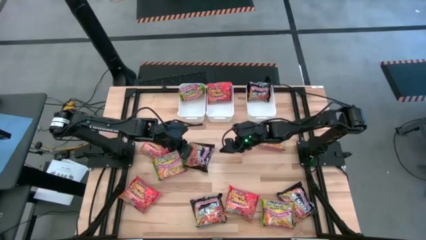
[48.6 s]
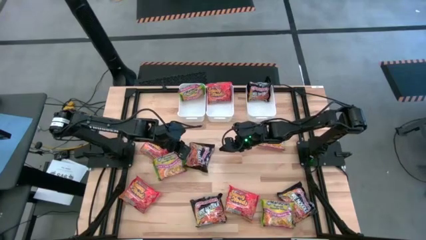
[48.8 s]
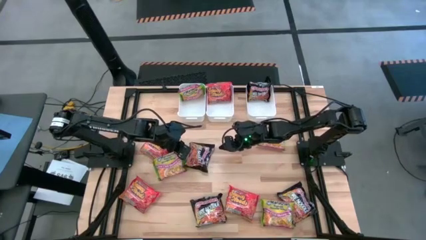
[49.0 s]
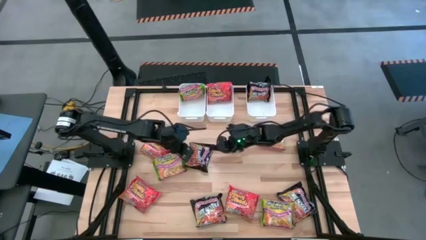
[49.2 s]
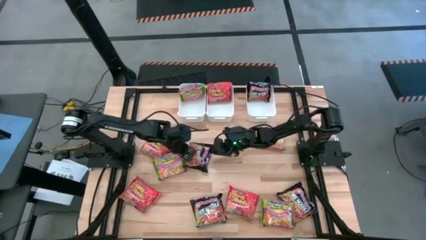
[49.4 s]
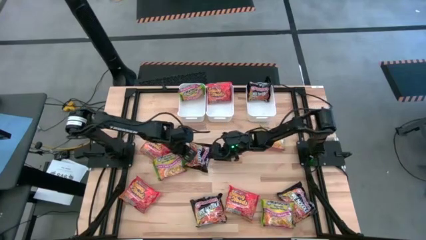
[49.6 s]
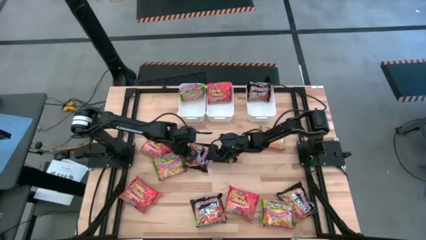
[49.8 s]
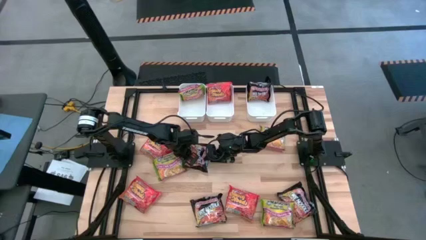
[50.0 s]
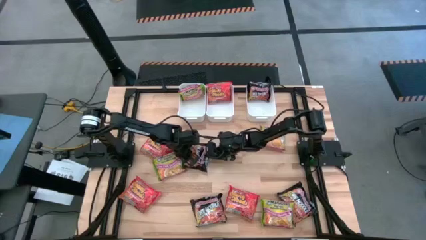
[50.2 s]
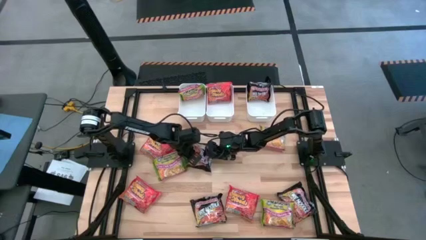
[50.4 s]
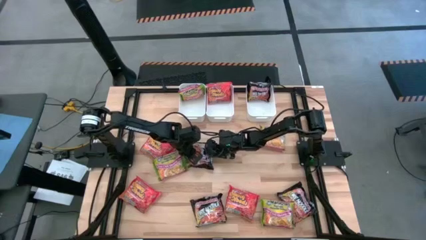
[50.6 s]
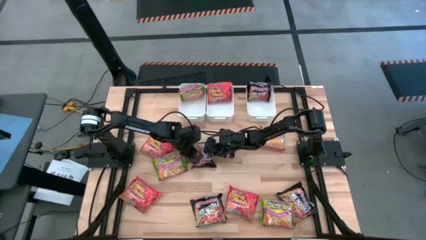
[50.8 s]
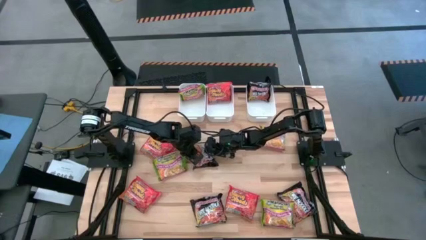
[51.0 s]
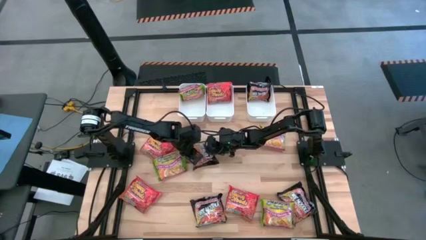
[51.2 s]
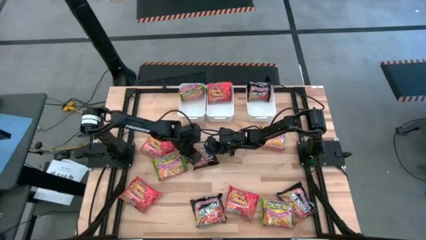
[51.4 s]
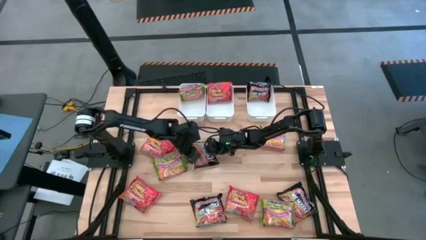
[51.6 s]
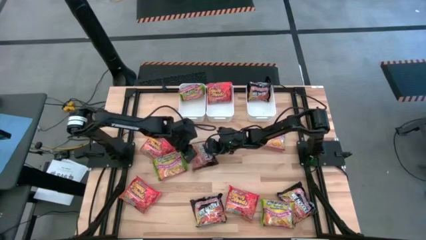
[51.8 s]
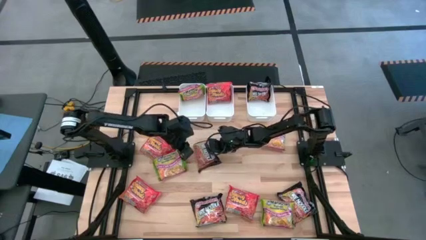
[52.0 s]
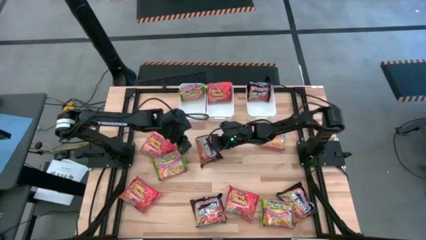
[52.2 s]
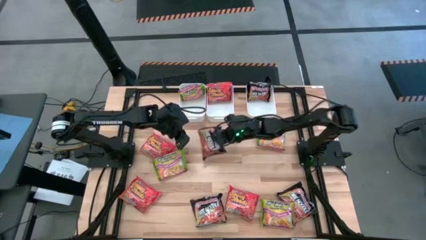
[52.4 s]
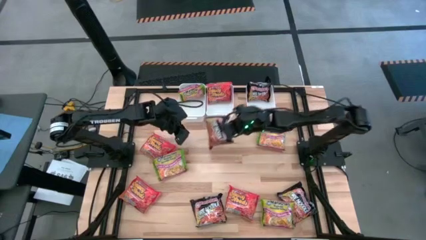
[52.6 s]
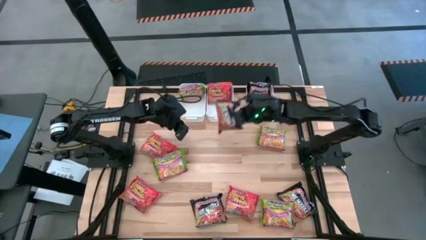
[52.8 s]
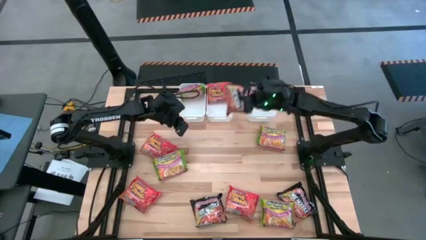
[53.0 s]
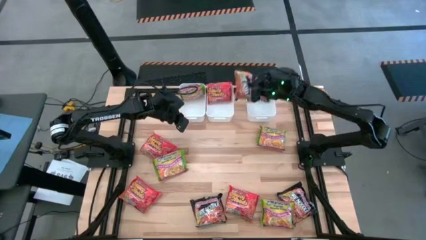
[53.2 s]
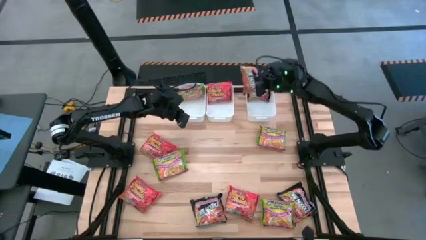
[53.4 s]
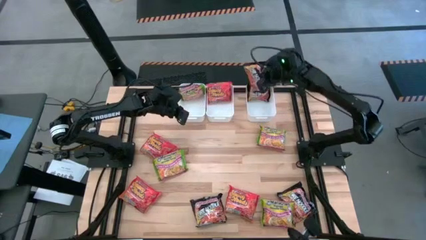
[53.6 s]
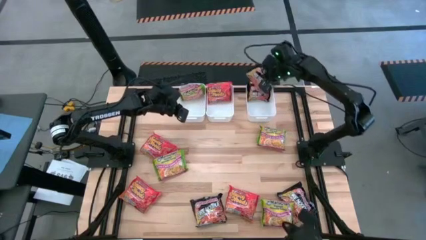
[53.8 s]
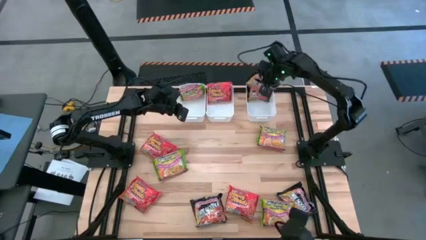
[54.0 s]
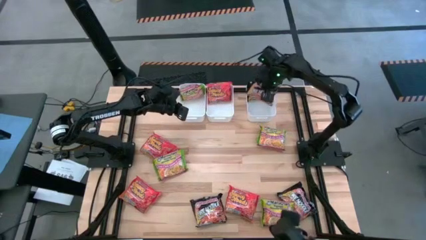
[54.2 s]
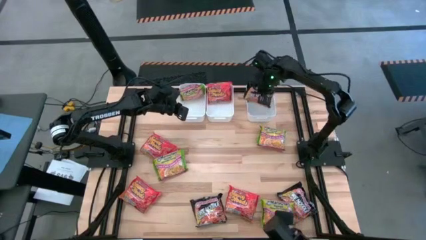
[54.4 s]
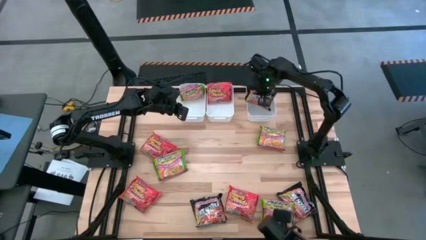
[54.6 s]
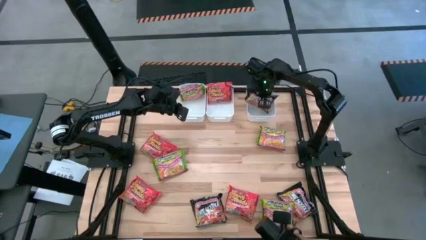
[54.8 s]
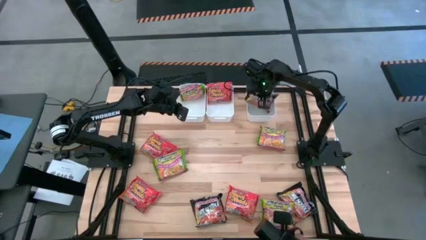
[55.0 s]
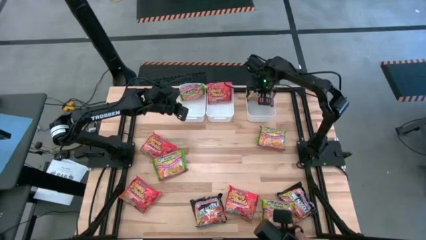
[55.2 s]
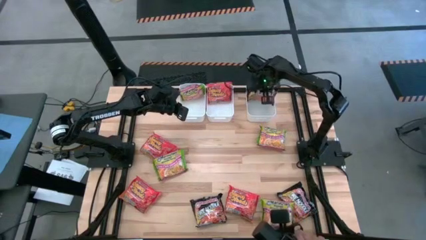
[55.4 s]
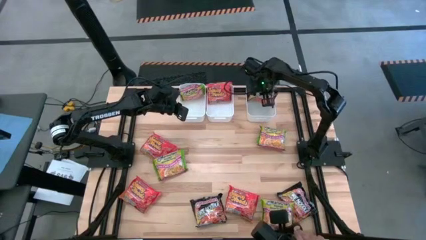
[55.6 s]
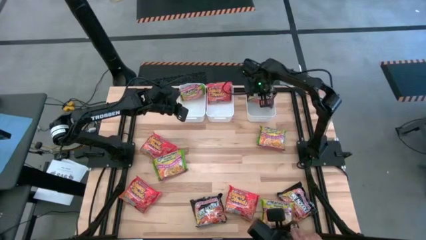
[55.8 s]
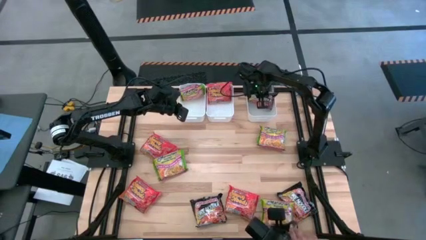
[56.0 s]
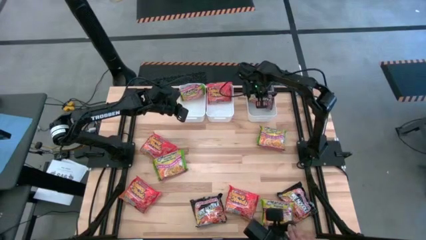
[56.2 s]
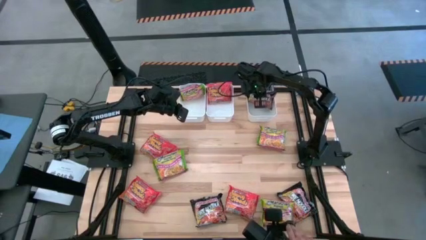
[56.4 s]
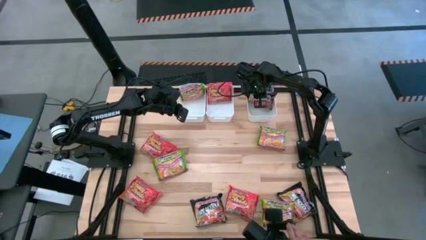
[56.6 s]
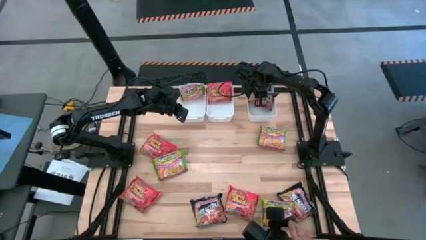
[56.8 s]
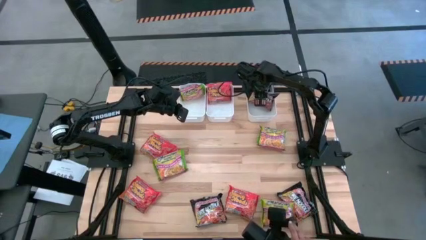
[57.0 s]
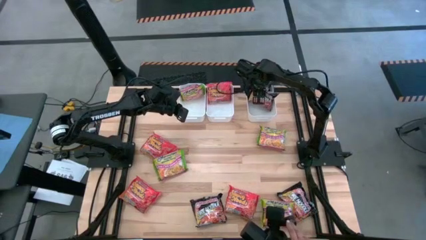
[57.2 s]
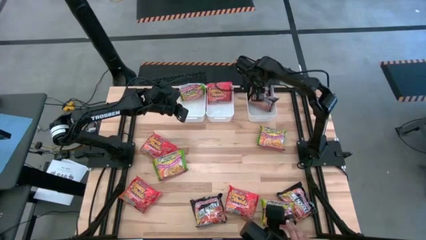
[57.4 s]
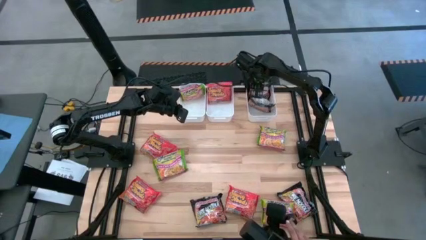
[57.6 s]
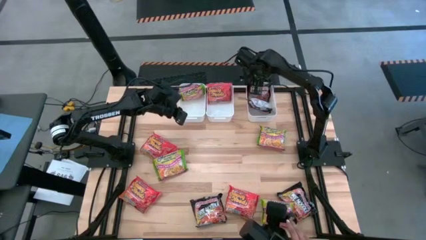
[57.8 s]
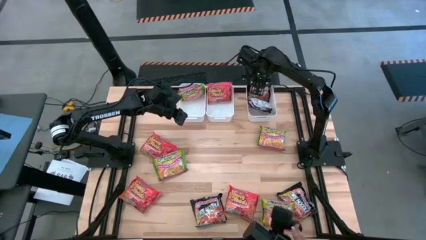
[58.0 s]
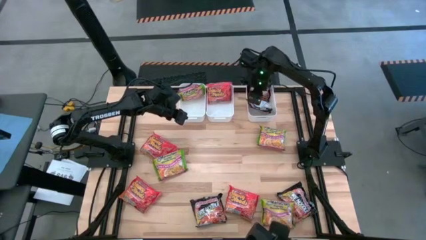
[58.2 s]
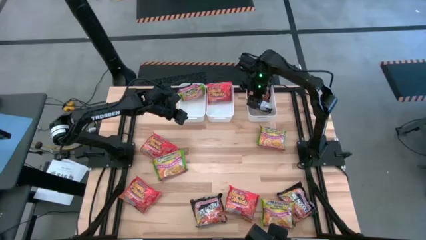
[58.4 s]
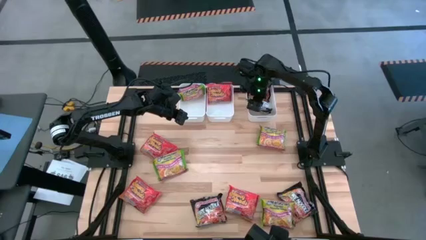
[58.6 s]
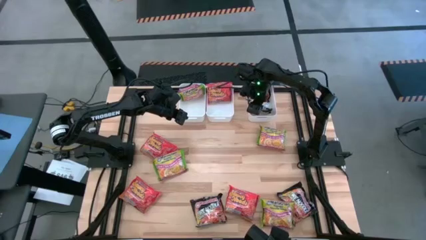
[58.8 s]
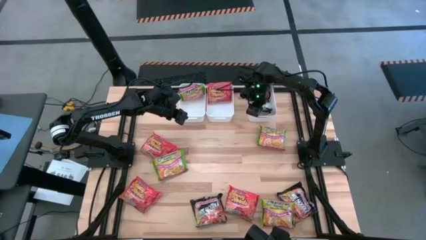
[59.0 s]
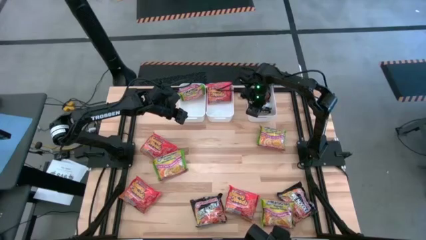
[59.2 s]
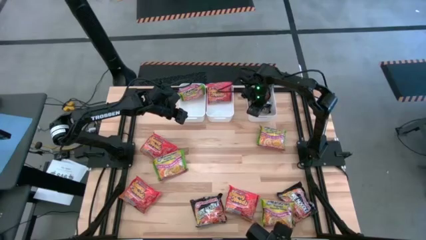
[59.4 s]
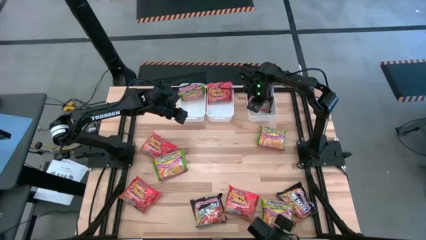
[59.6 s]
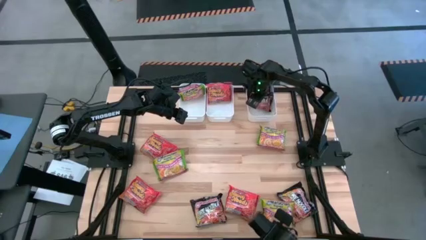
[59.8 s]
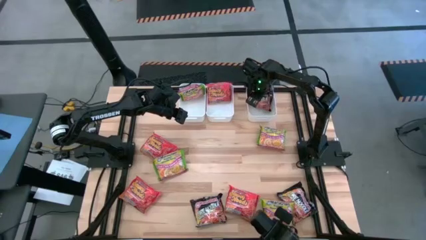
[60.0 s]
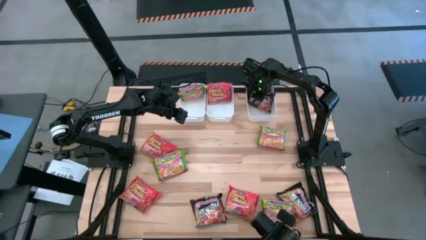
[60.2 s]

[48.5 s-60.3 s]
Task: Sort Maruchan noodles
Put the black noodle pack into the right white bin

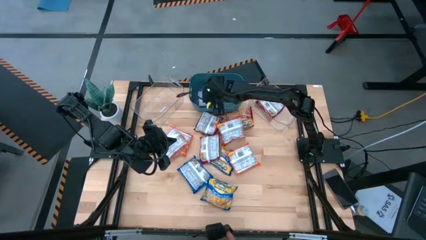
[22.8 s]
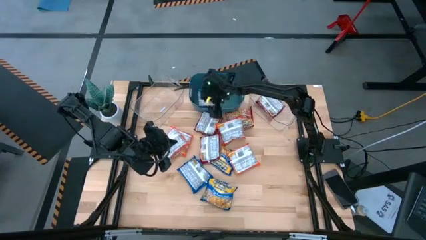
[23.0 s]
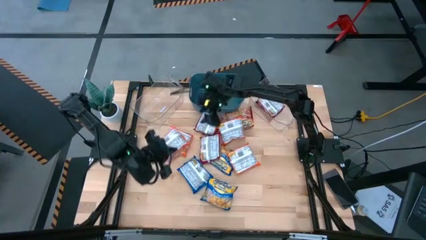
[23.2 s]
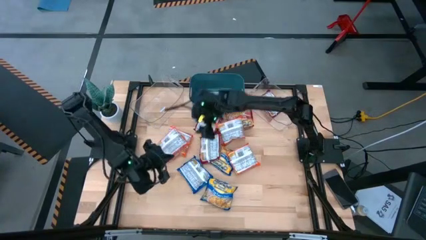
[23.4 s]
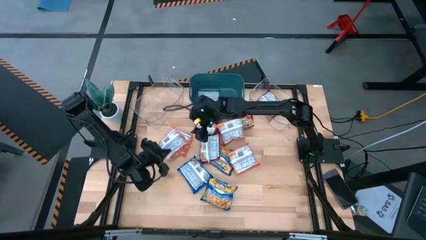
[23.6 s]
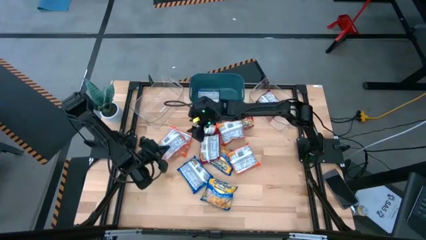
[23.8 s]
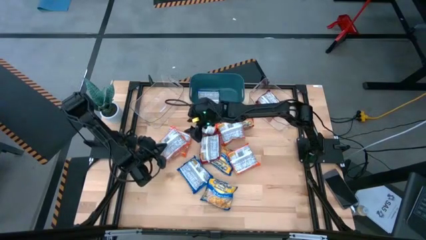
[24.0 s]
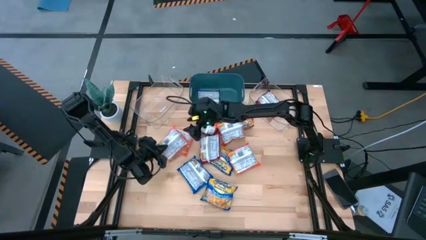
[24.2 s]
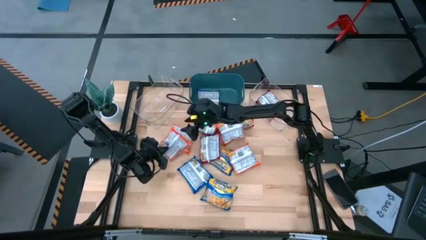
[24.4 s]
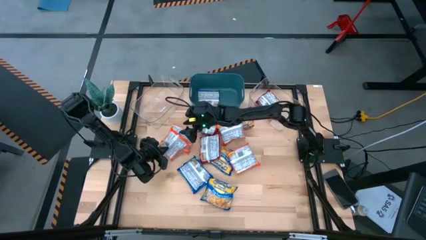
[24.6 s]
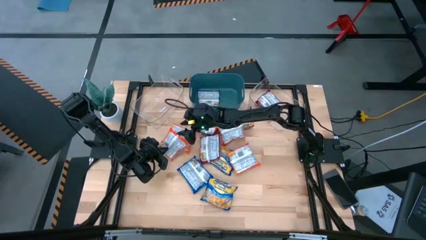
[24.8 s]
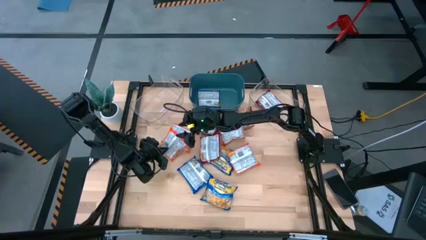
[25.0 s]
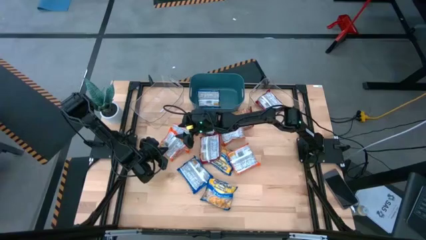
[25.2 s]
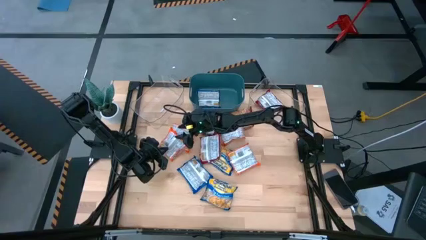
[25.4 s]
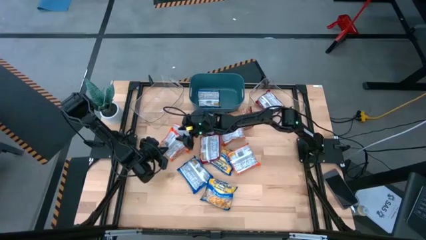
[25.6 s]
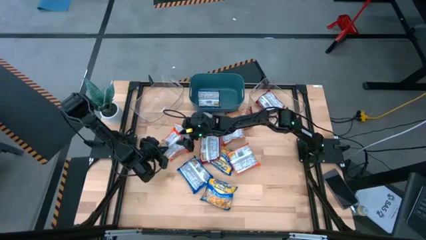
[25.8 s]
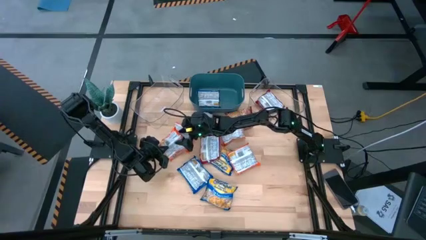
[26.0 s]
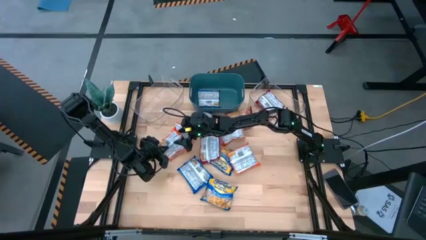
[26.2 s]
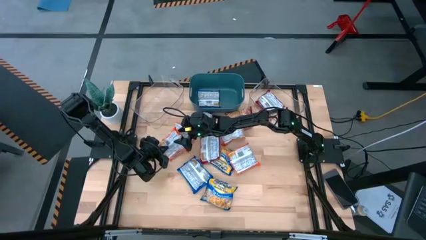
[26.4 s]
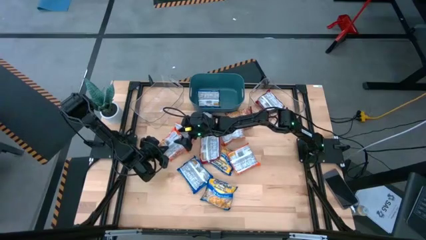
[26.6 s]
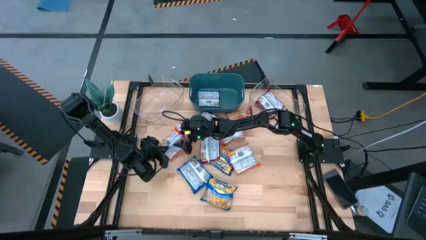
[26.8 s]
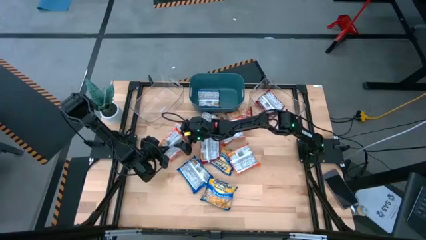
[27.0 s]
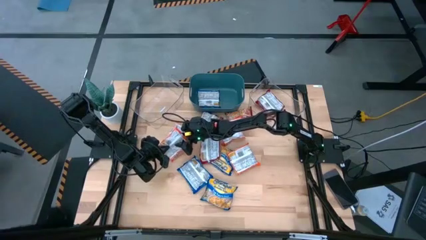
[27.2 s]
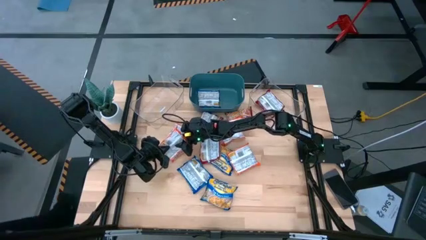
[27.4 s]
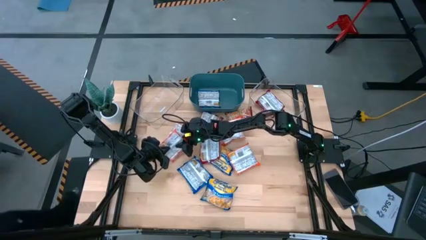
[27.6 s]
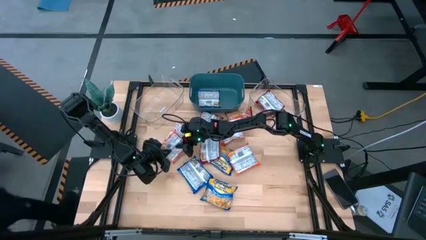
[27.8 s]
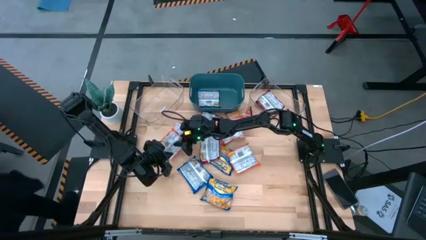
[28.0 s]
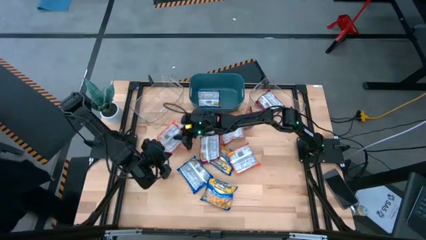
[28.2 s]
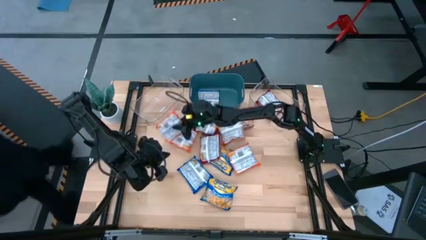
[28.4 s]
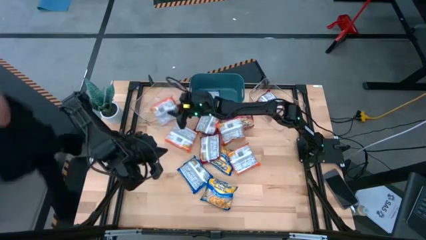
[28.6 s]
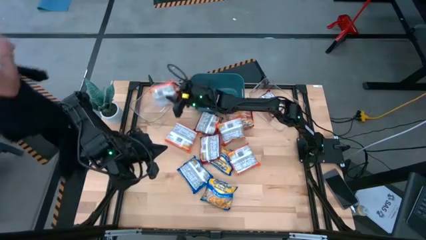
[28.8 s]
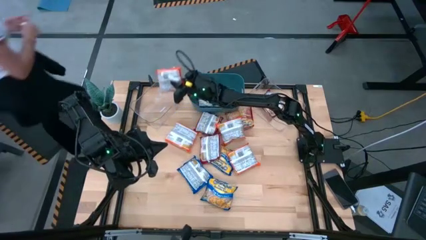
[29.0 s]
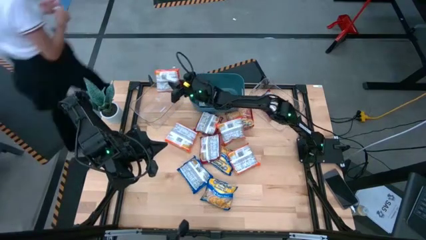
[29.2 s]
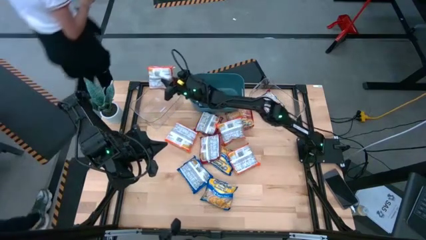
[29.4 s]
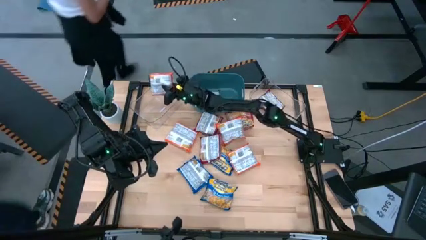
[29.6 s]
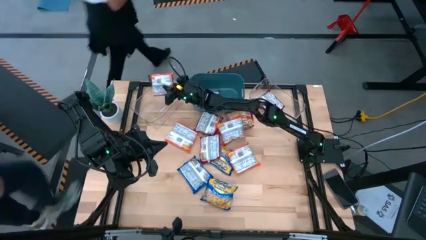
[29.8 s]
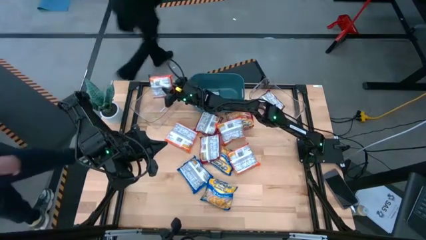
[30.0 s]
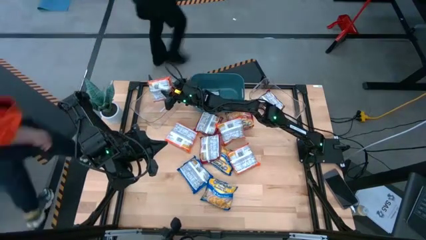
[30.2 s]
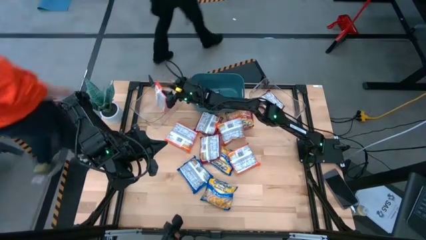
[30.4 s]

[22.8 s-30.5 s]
Task: Sort Maruchan noodles
Put the orange noodle pack into the left transparent bin
